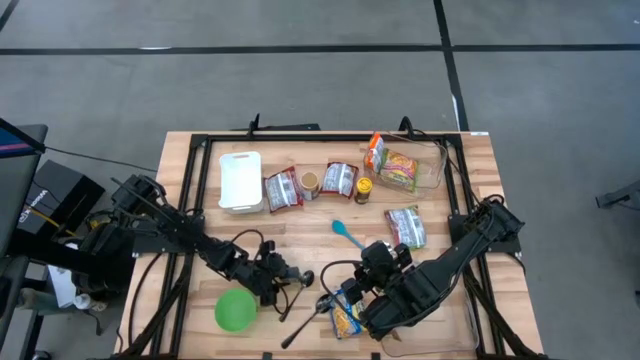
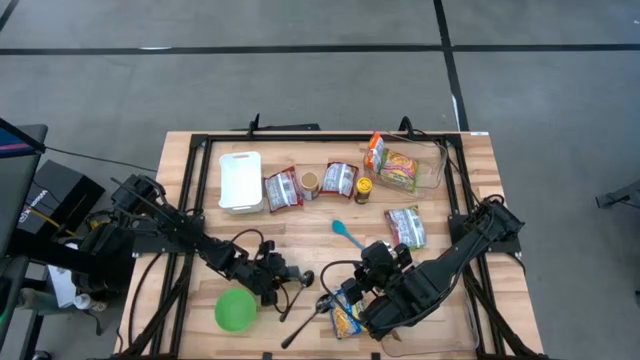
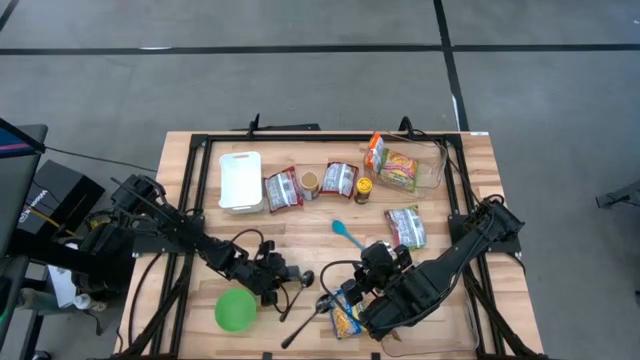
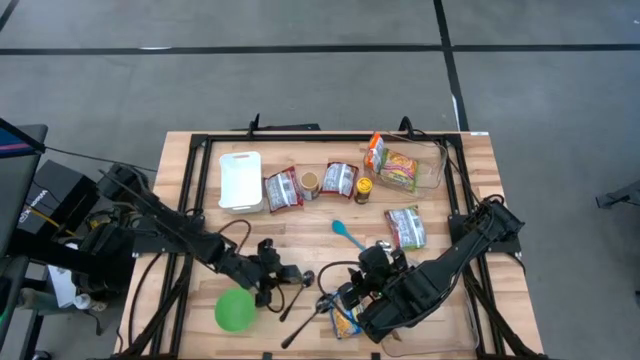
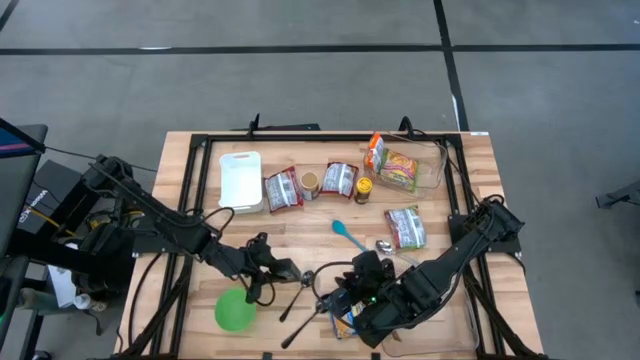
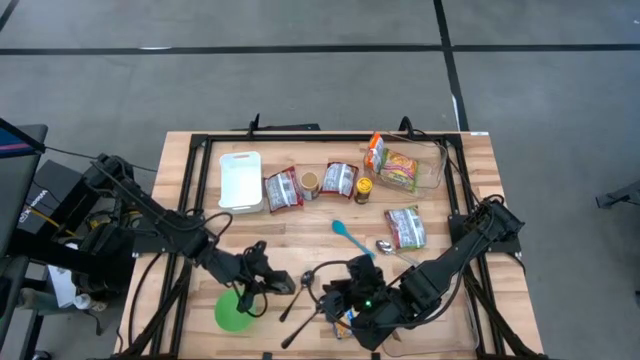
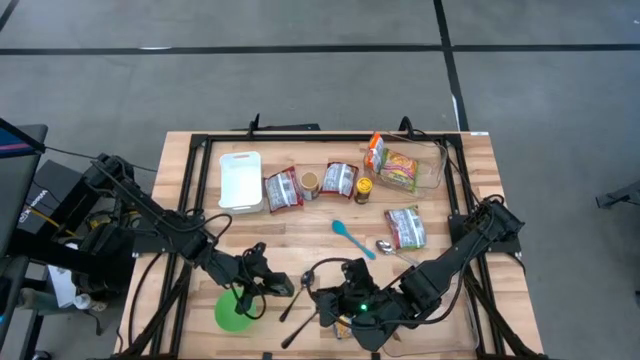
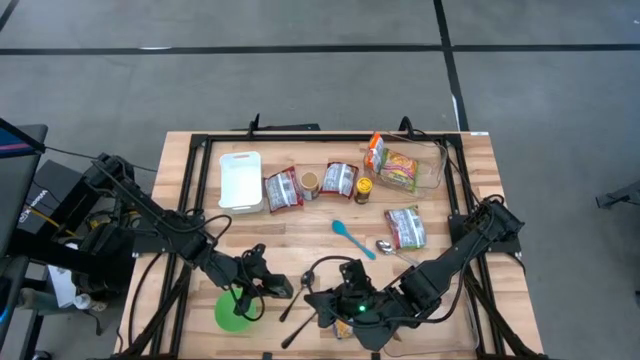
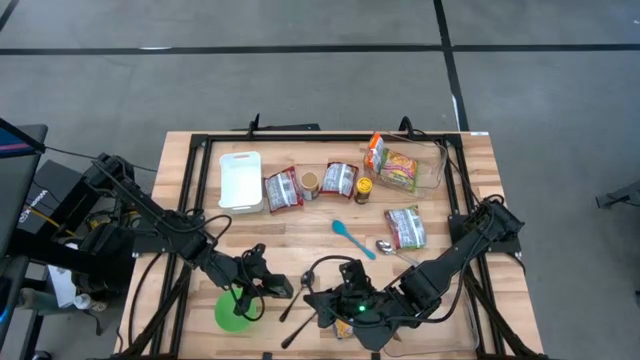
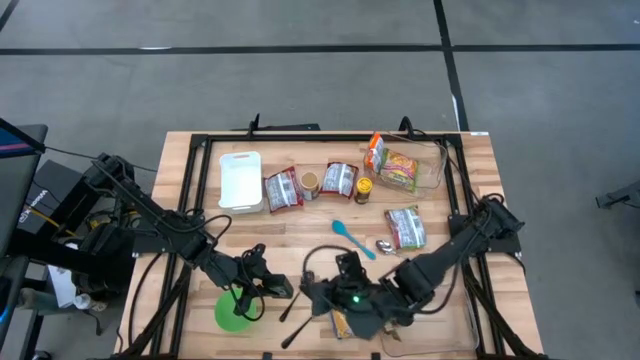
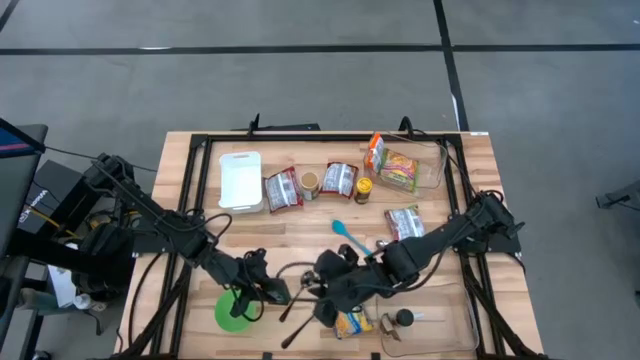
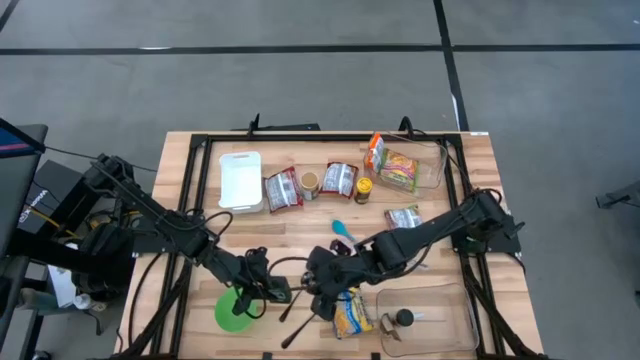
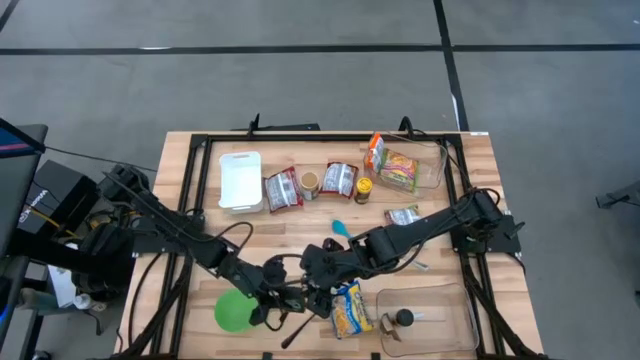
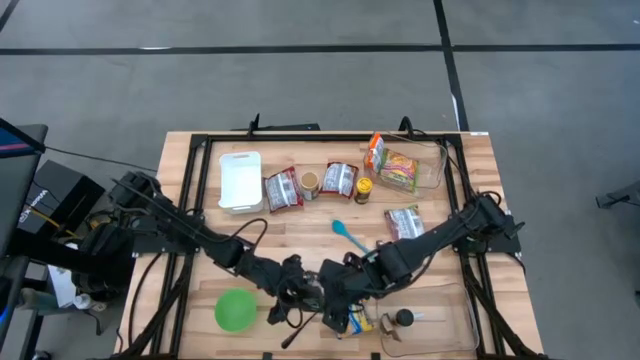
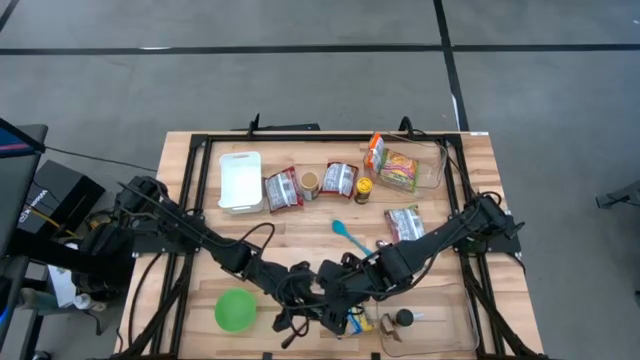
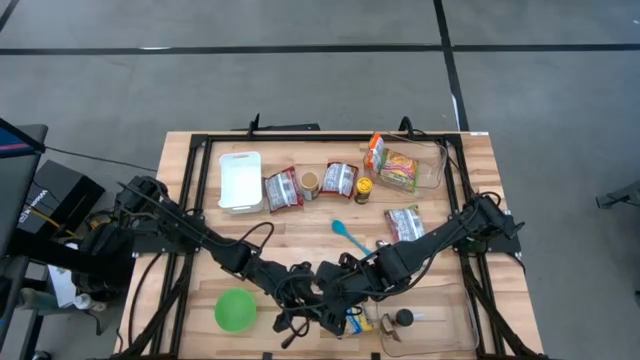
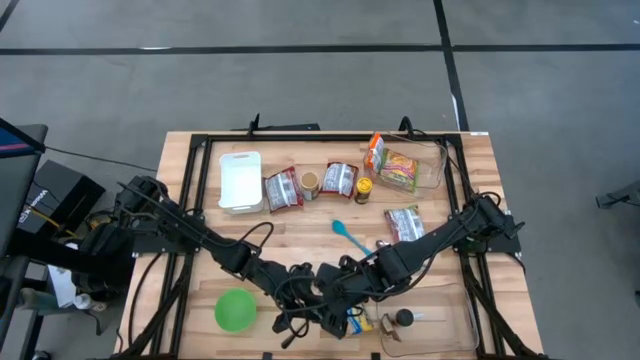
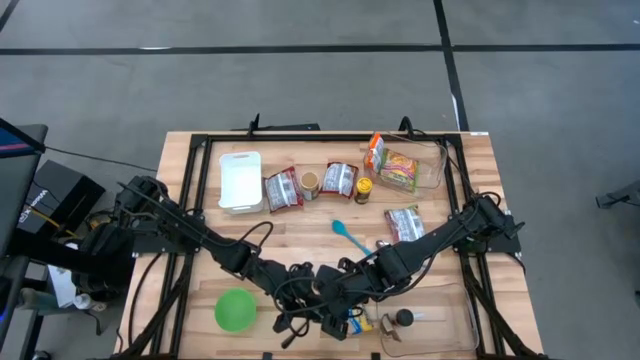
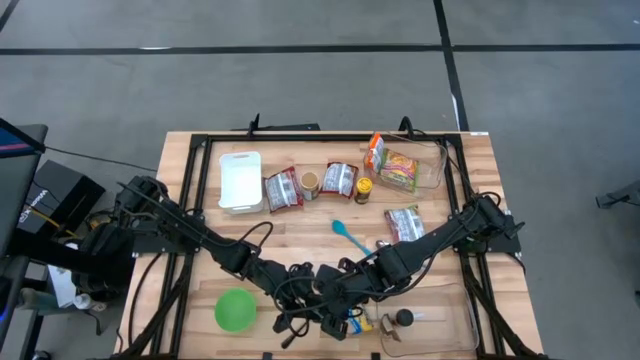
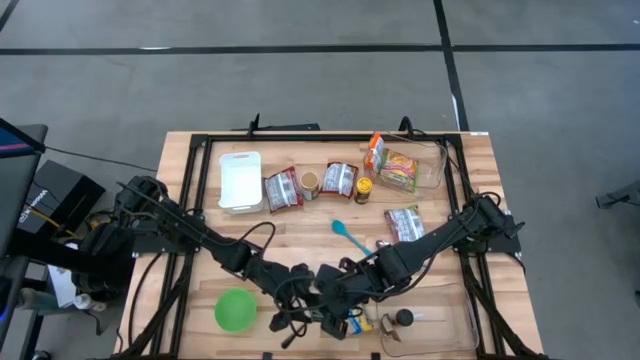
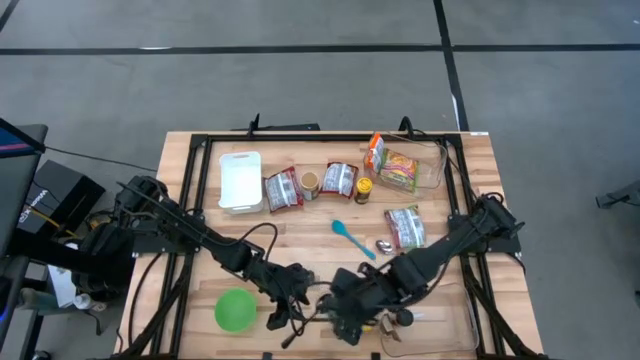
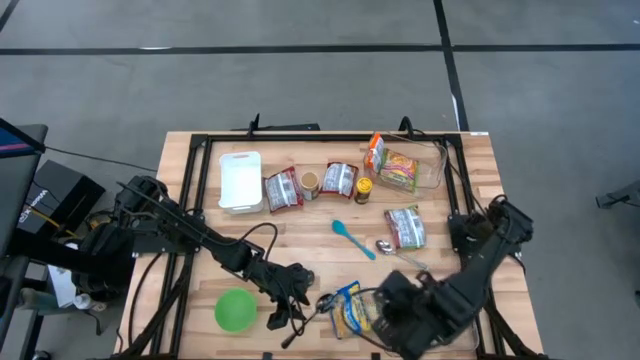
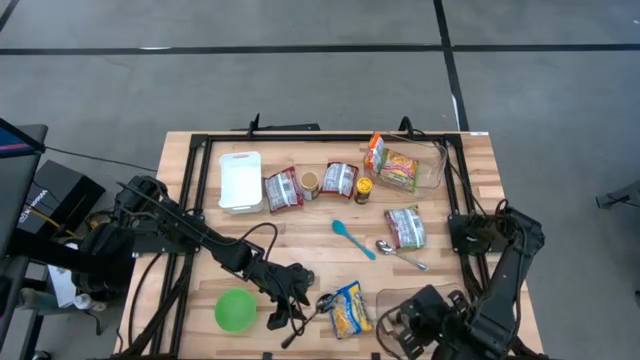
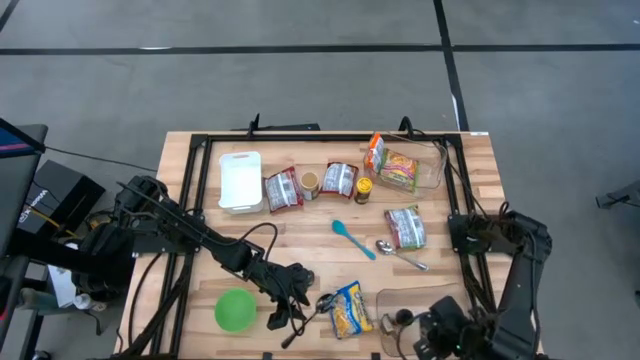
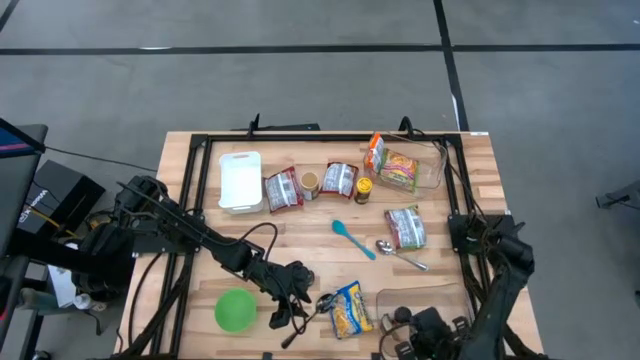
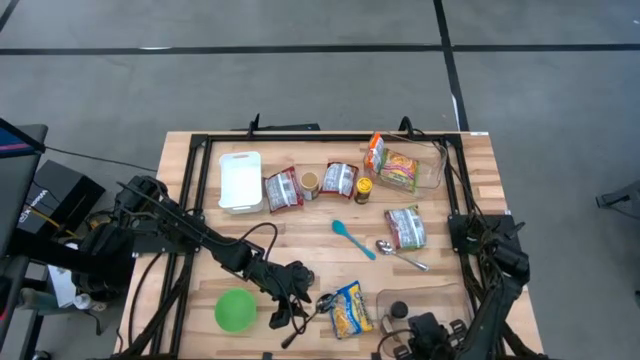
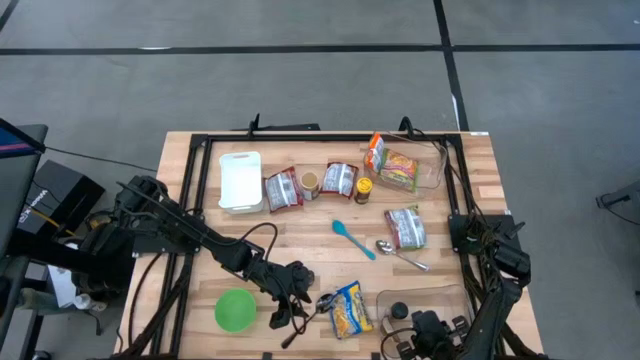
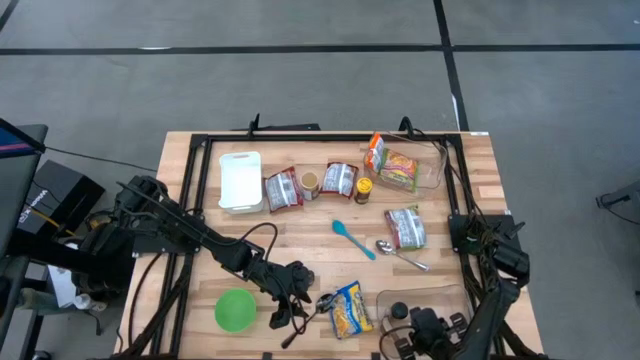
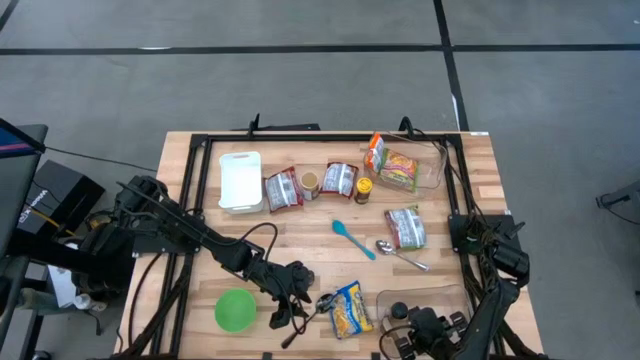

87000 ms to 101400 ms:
Task: Pick & Place Food Item
Put the black spice can into the bottom transparent bin

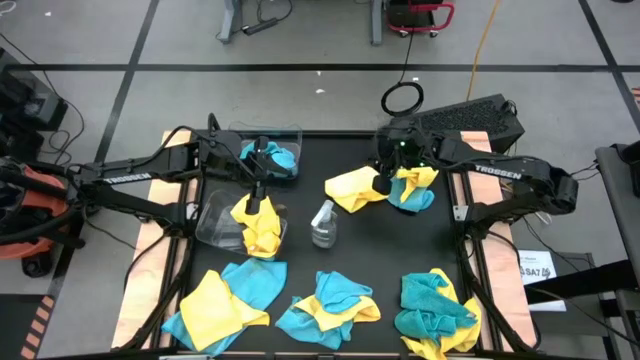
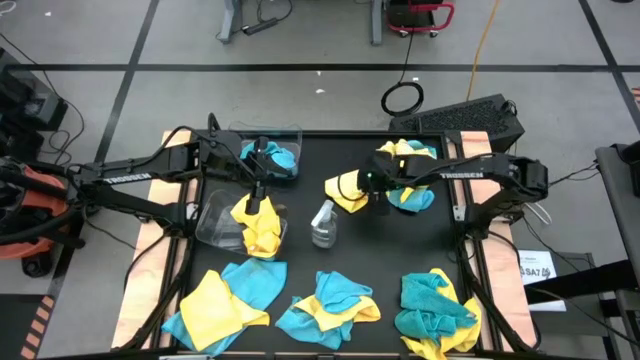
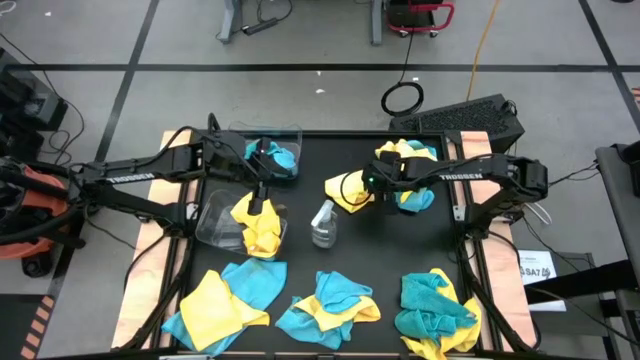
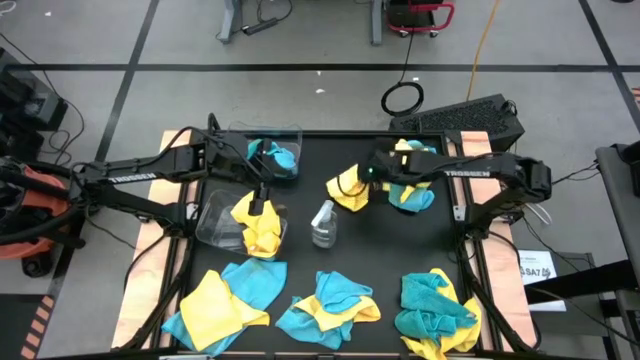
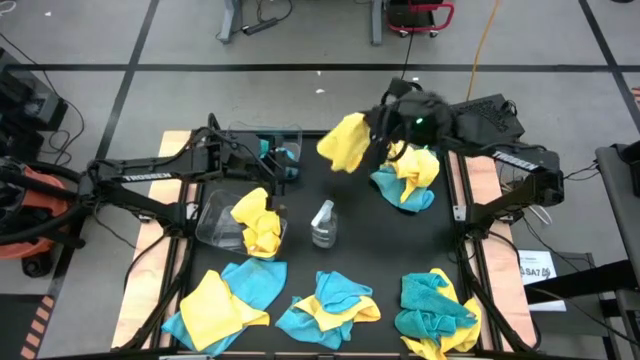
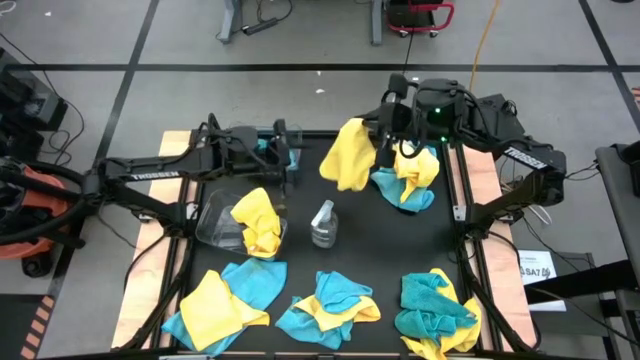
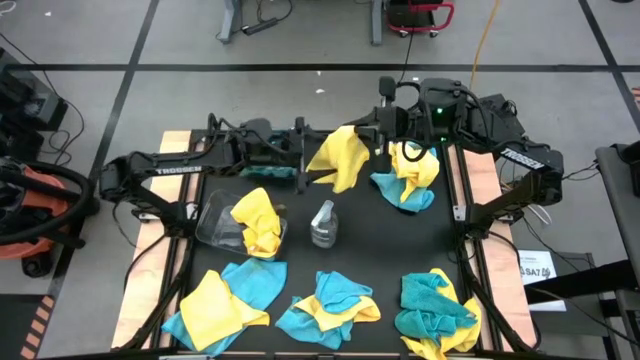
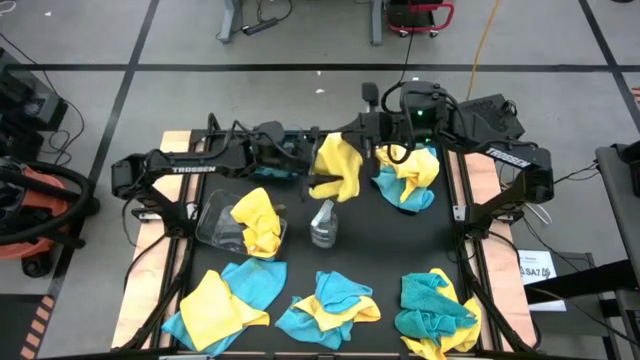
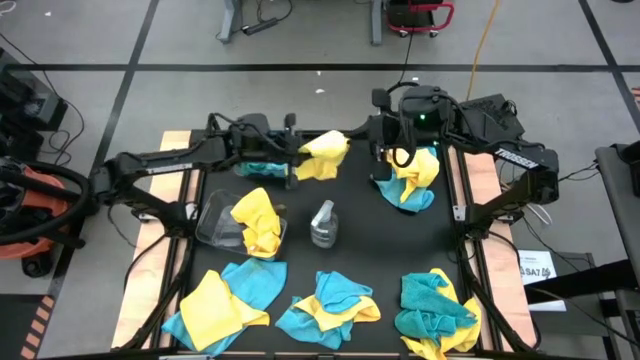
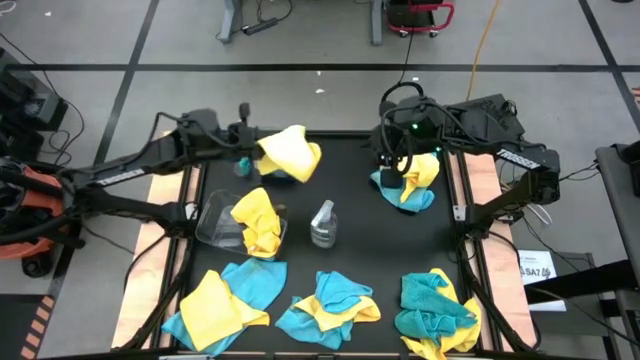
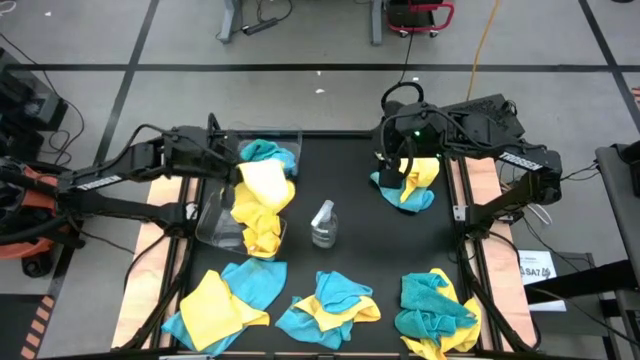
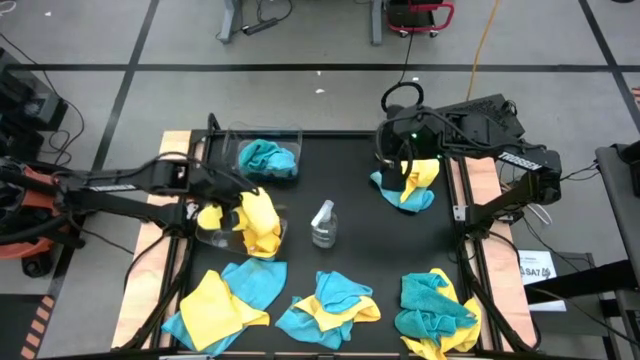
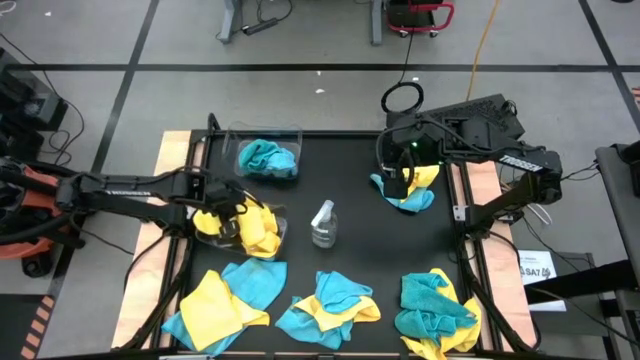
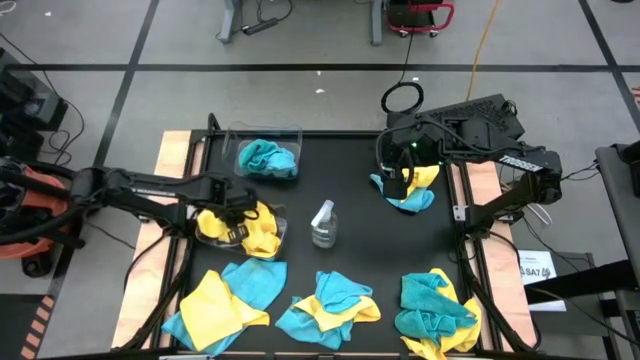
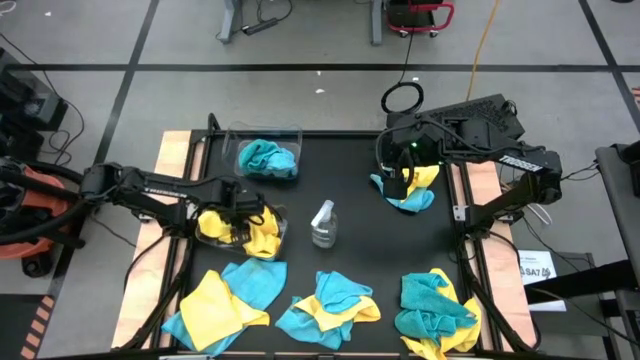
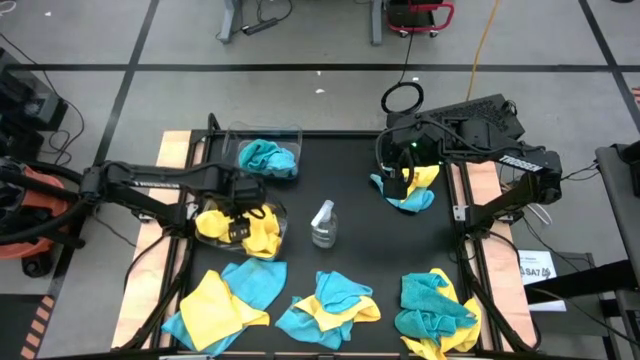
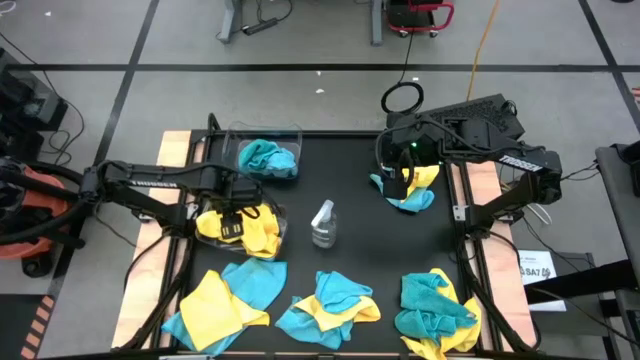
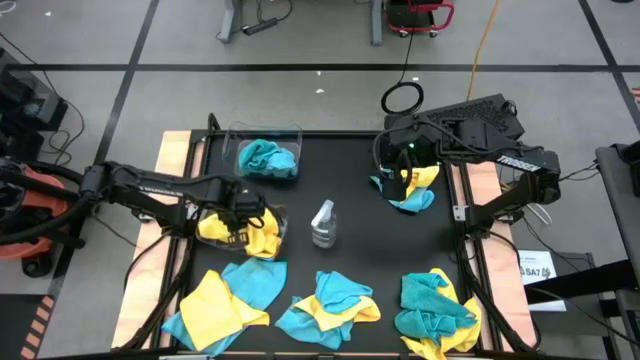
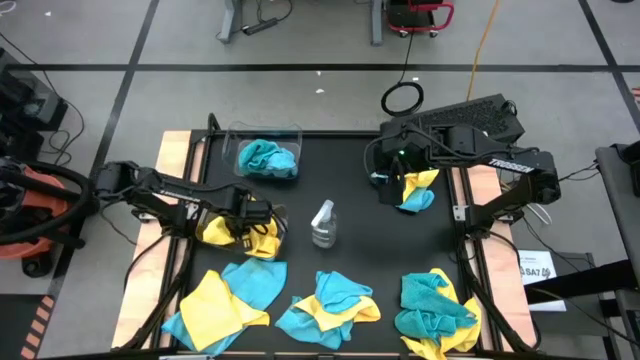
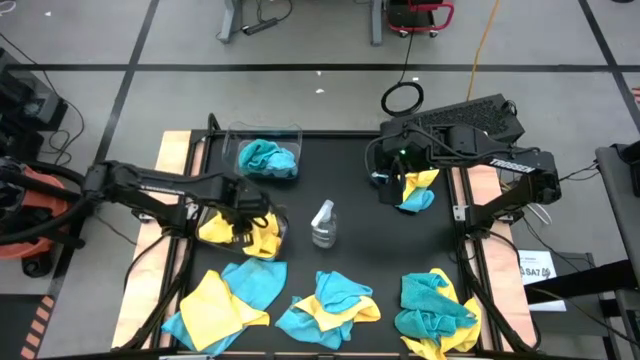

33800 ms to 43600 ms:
Task: Sort microfiber towel by color & place in baskets
Put the yellow microfiber cloth into the bottom transparent bin
